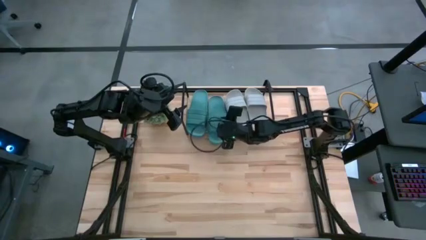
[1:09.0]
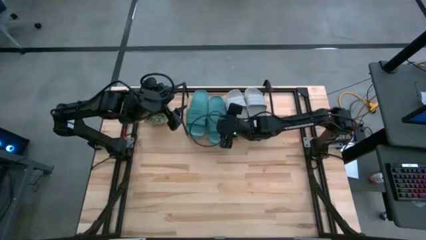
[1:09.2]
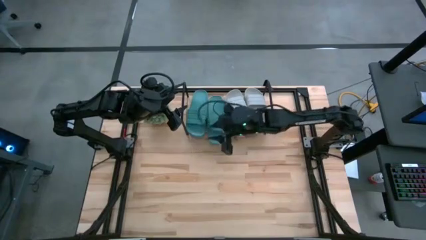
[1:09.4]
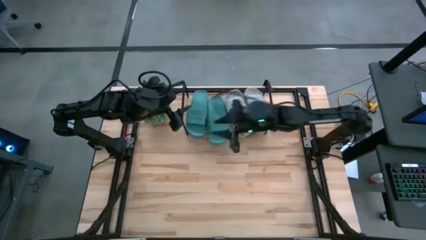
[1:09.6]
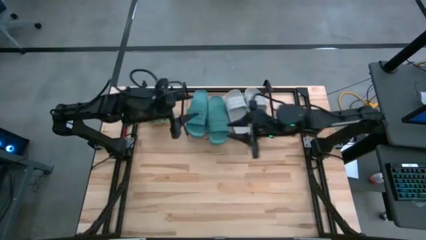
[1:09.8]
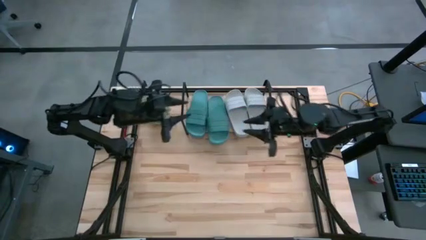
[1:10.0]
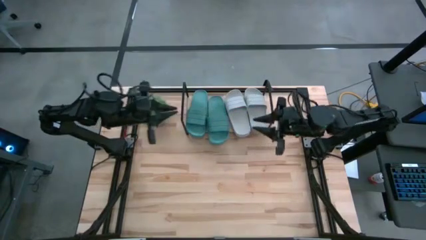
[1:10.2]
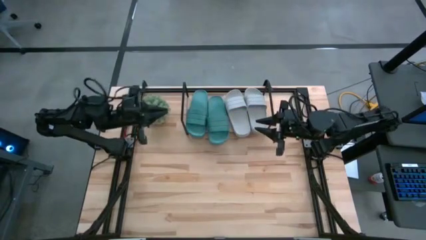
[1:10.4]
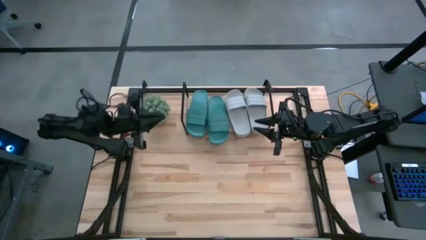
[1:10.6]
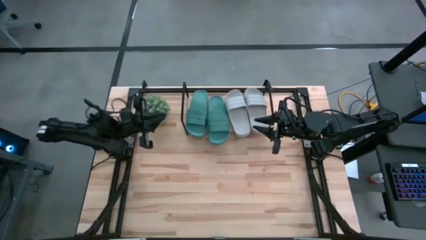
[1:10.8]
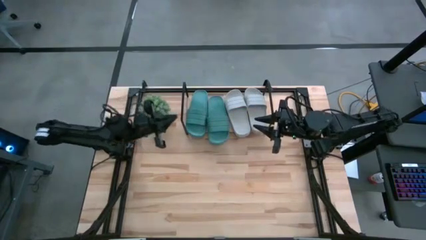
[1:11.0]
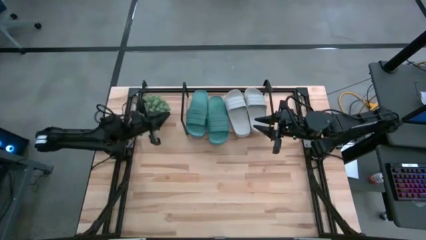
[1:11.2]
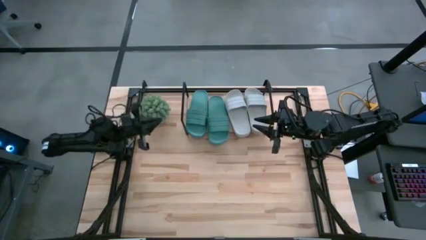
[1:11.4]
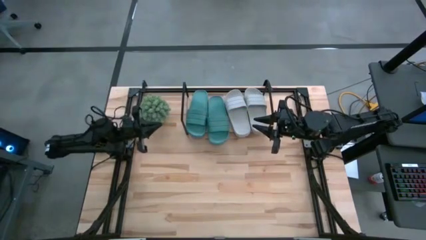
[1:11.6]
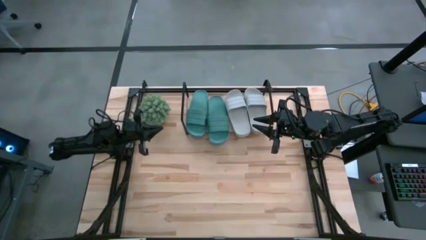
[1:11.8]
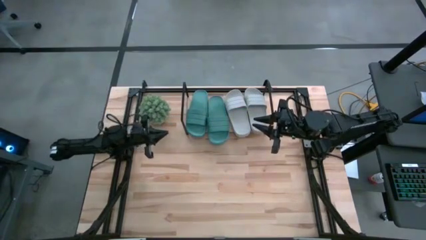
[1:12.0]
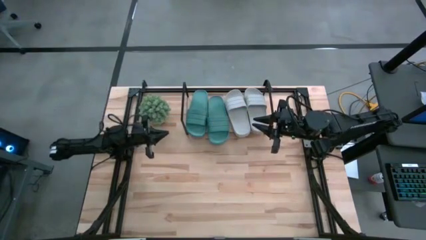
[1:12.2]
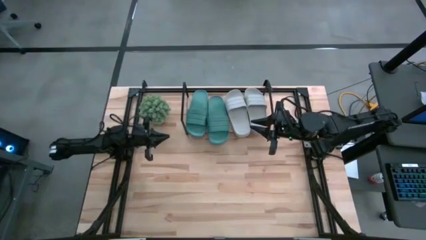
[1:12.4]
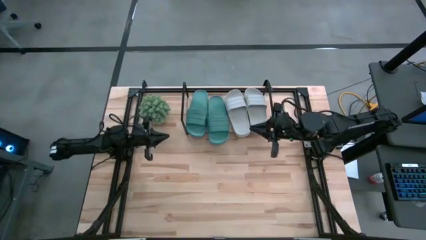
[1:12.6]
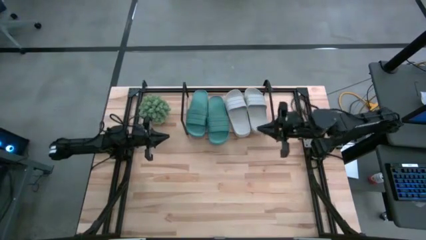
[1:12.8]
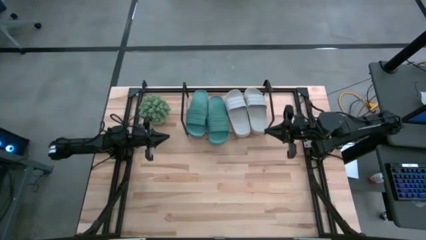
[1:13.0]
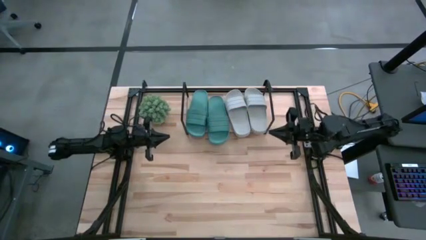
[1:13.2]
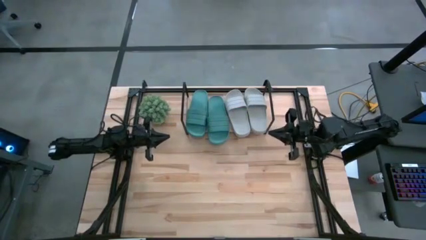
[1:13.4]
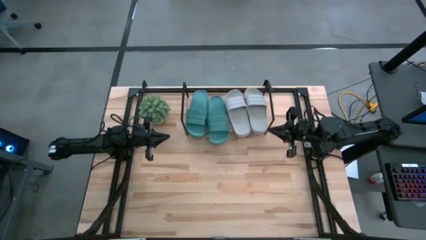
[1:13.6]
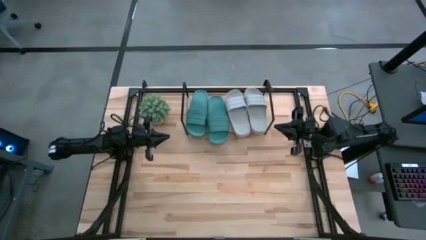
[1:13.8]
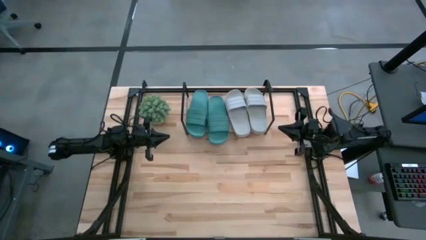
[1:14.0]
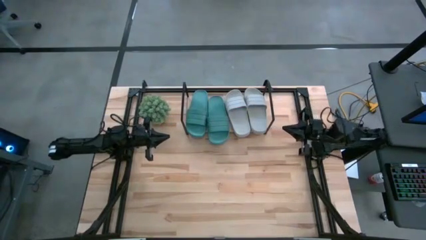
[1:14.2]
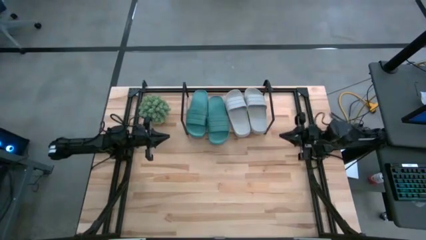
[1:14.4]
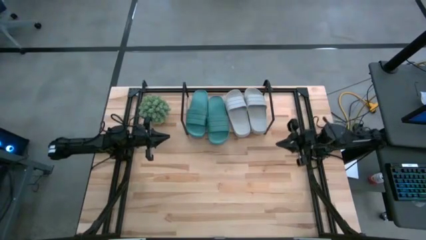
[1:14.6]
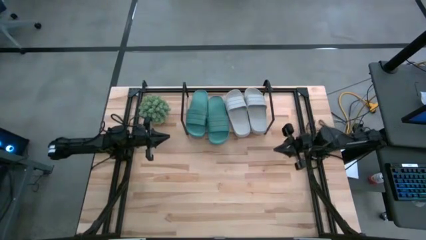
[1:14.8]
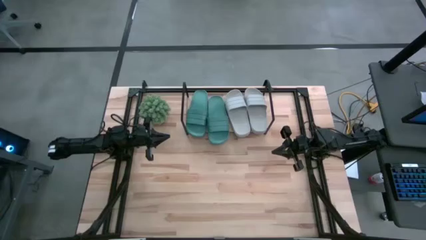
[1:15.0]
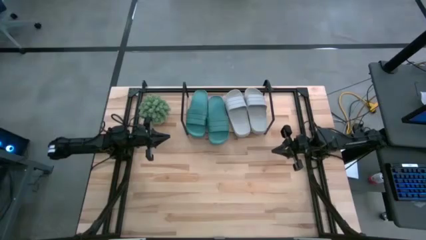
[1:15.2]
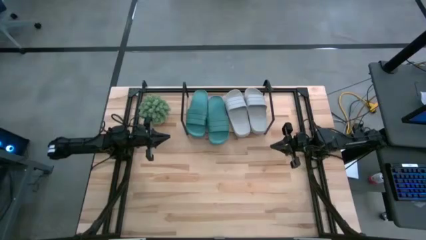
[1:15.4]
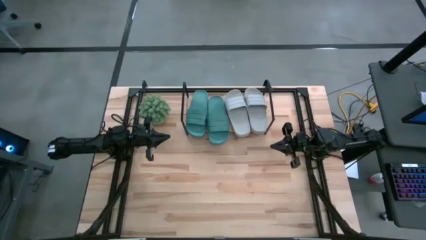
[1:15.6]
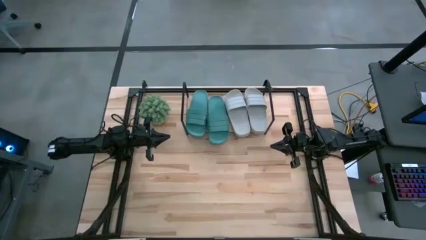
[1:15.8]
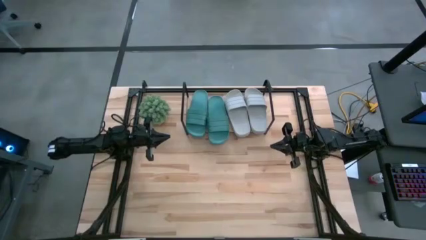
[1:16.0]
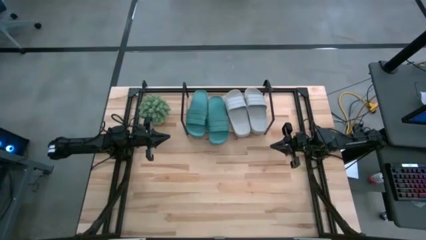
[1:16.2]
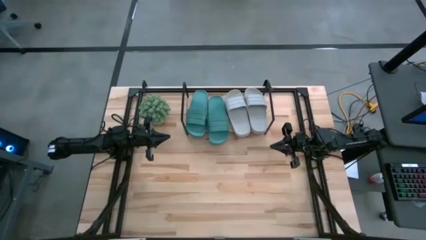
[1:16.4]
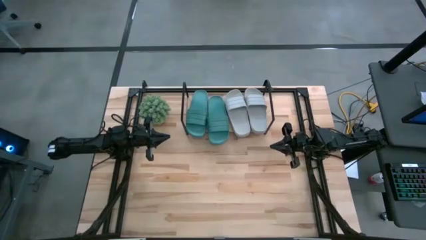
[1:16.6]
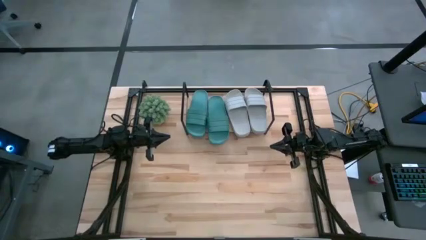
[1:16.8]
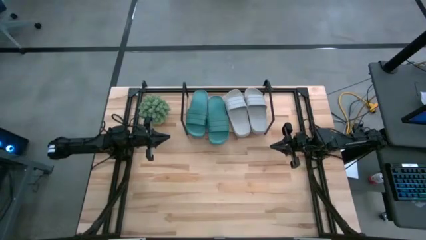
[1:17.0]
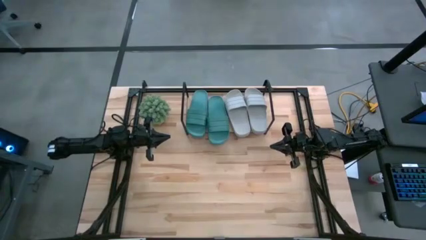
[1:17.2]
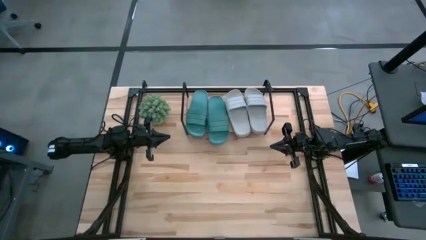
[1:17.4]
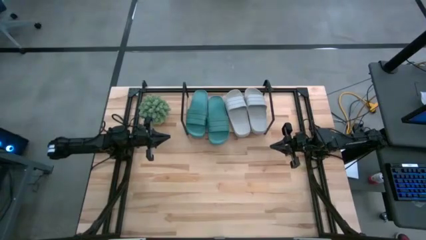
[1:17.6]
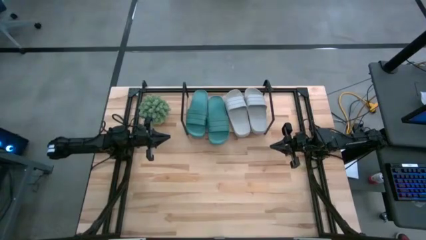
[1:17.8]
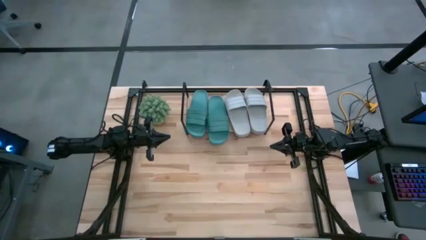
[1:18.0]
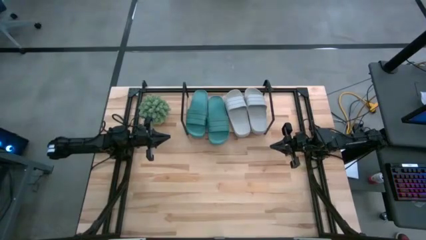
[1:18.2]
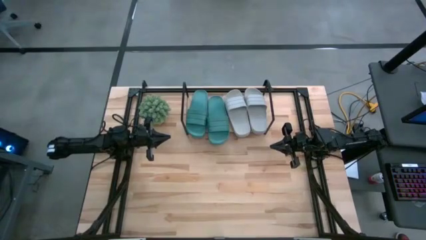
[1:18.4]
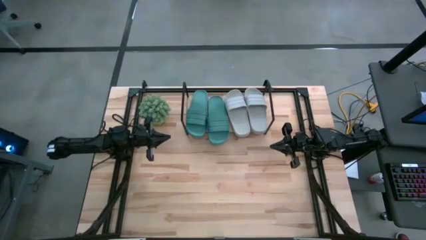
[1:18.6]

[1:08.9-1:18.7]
Task: Pick and place slides into the shelf
Return to Home Position

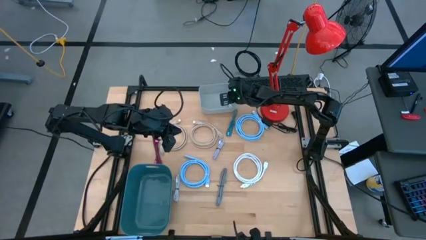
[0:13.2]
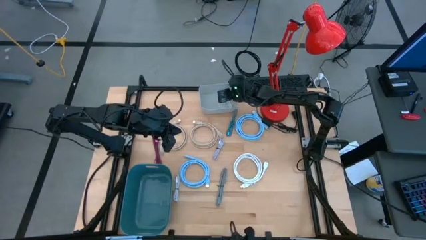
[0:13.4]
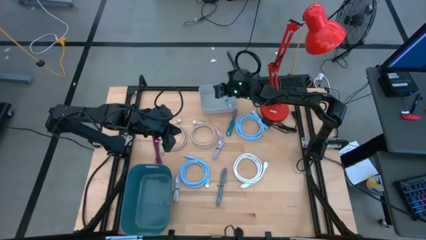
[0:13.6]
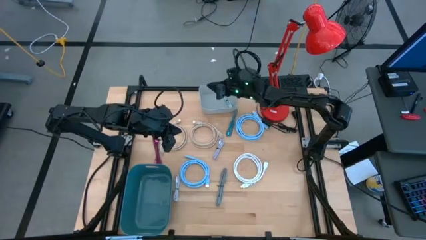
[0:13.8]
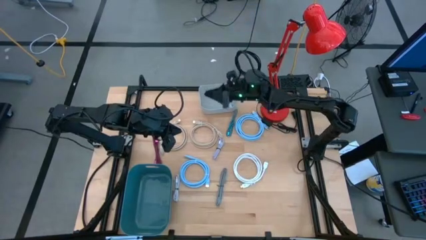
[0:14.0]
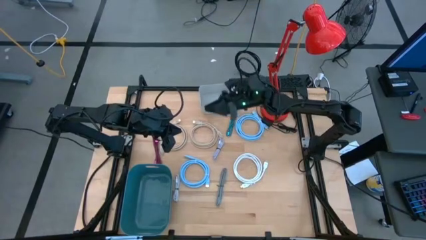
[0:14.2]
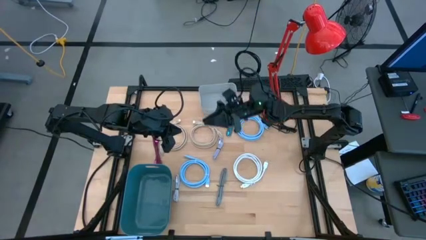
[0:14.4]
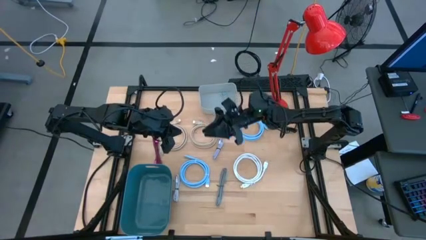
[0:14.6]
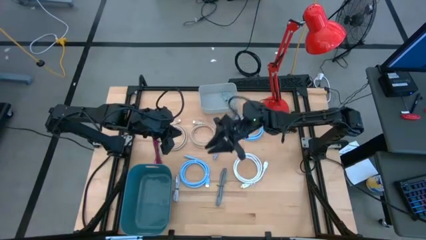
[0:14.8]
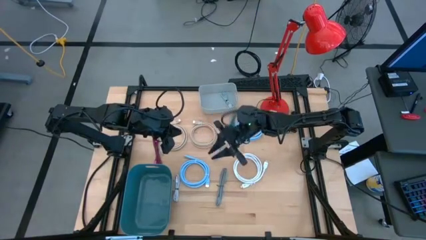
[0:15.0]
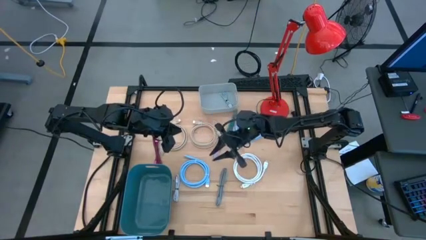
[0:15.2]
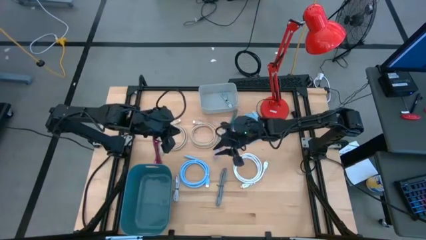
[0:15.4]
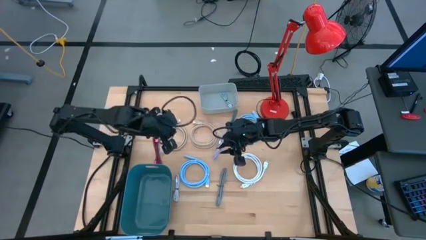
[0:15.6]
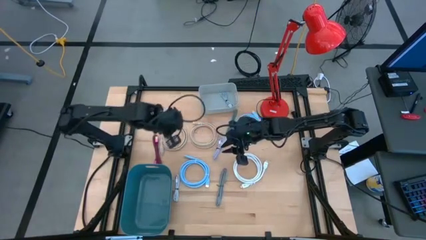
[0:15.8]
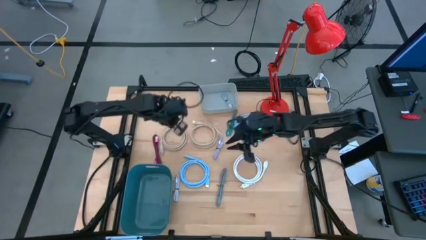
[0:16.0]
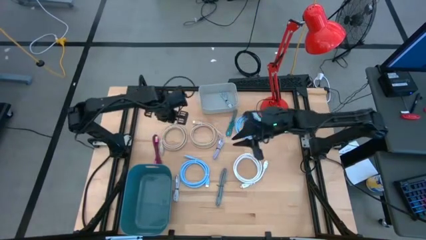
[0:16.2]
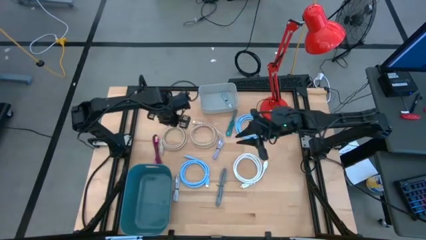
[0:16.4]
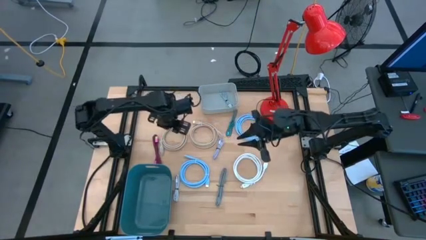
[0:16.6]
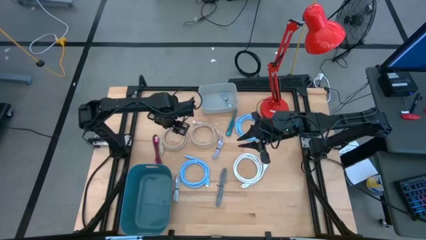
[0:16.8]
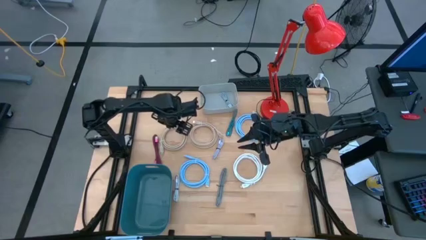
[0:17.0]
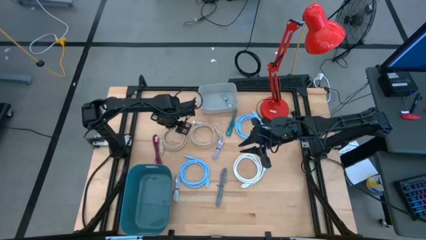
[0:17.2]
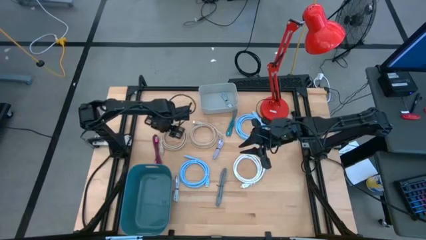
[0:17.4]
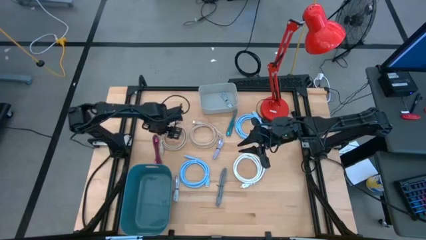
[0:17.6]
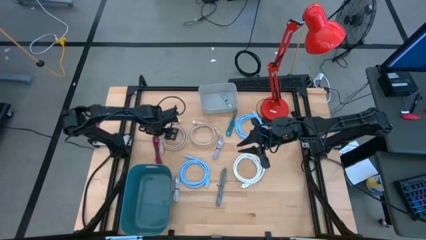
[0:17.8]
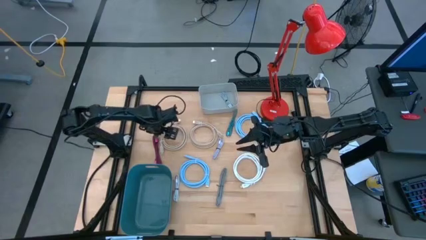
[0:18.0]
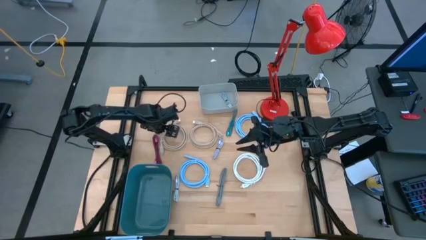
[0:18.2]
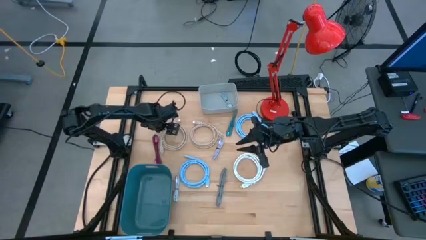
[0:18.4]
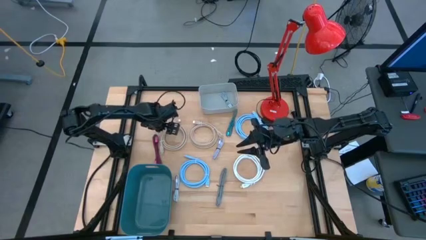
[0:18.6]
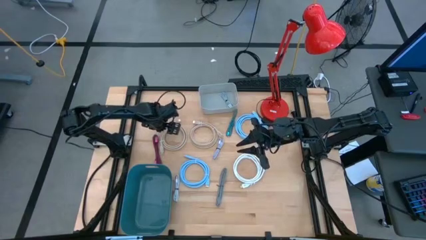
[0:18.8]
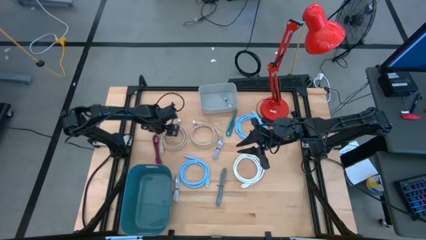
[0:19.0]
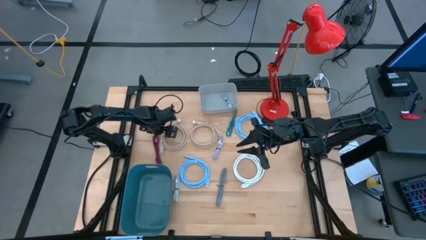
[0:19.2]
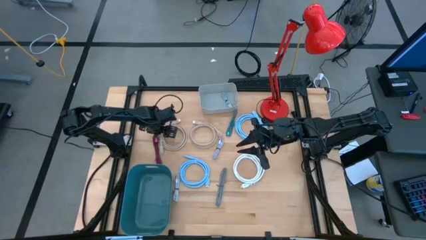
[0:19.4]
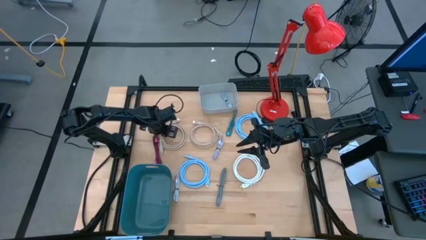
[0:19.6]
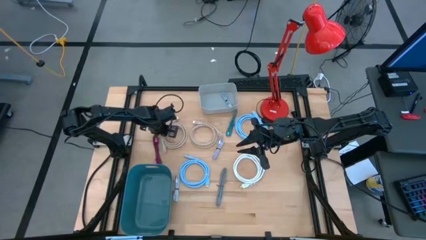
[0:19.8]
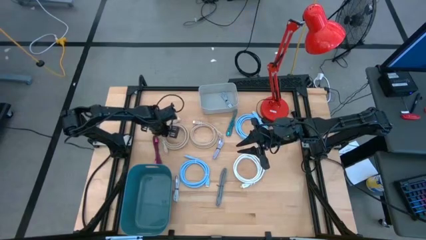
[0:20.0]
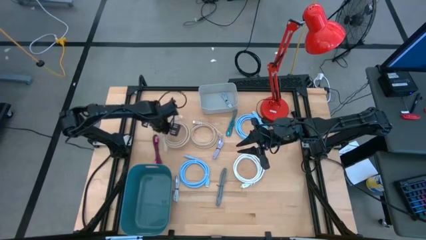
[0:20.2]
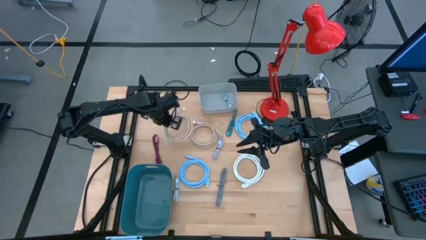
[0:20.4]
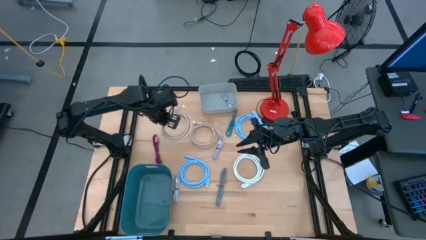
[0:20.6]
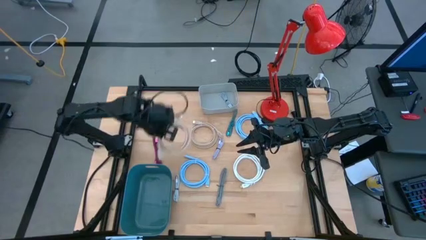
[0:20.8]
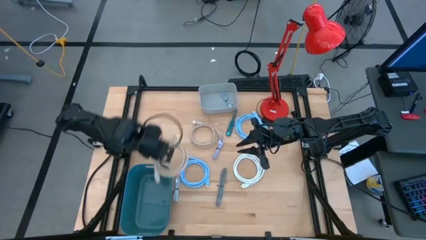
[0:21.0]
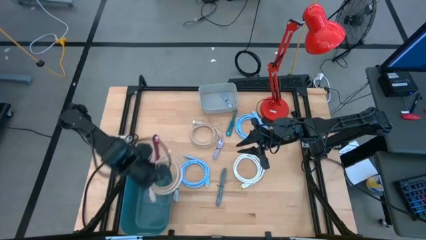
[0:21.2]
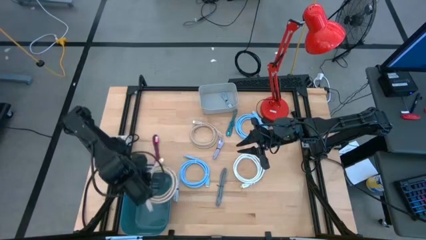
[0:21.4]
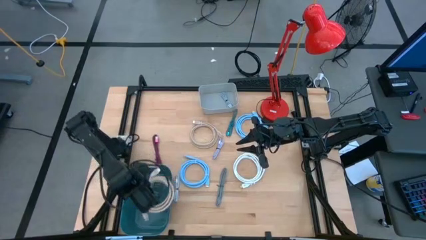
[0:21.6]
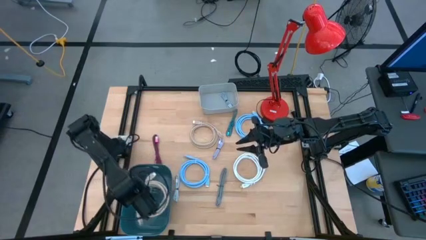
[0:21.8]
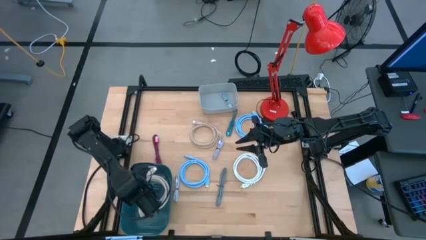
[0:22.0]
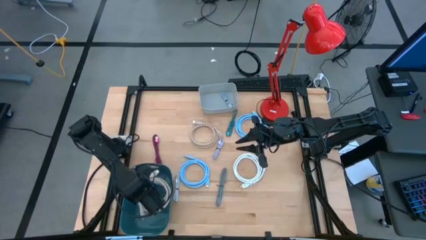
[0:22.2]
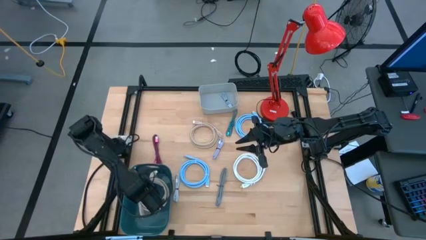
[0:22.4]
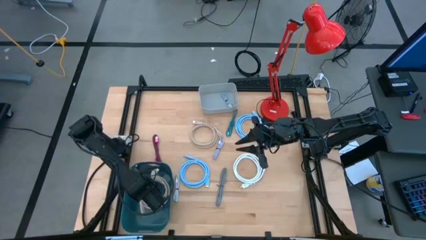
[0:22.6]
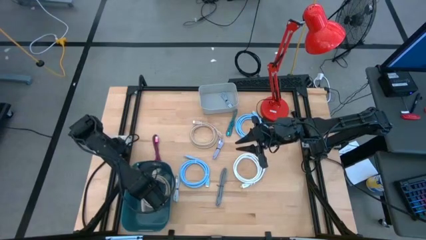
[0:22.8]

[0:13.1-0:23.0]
Task: Pick & Place USB Port
Put the brown HDMI cable into the blue bin
